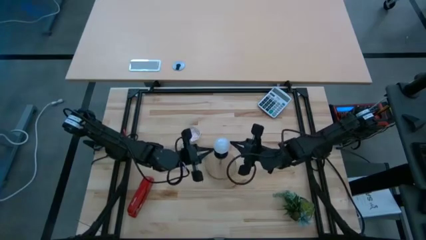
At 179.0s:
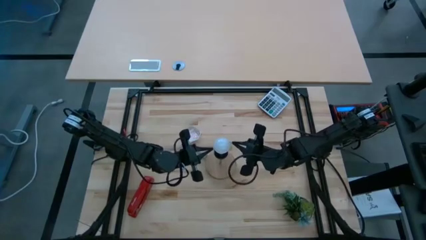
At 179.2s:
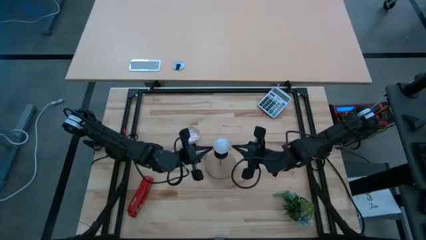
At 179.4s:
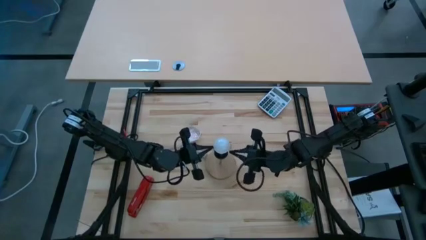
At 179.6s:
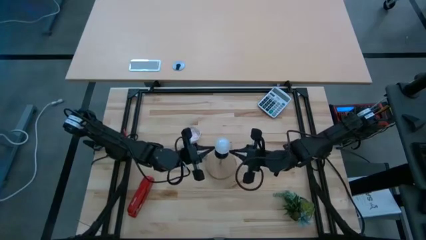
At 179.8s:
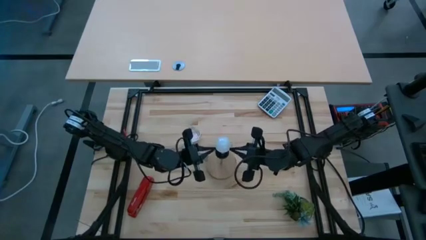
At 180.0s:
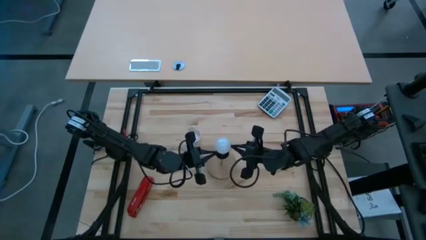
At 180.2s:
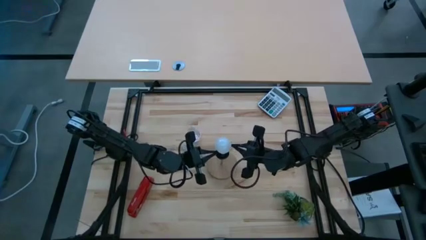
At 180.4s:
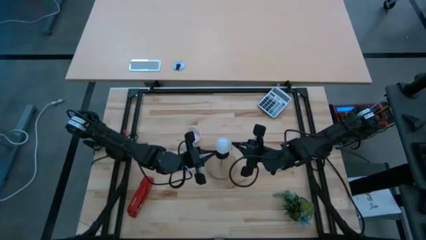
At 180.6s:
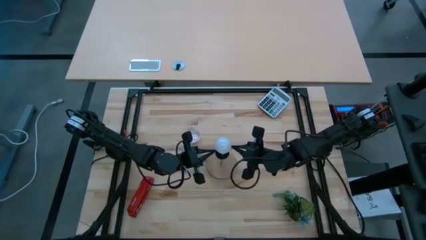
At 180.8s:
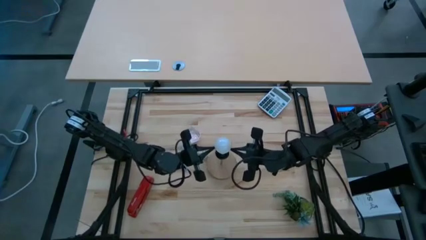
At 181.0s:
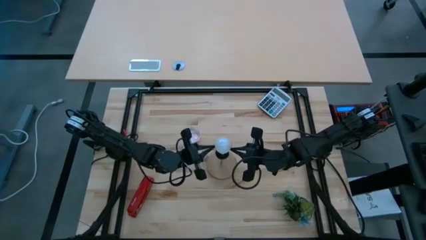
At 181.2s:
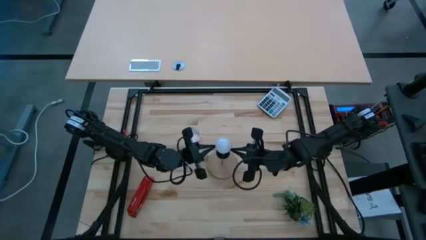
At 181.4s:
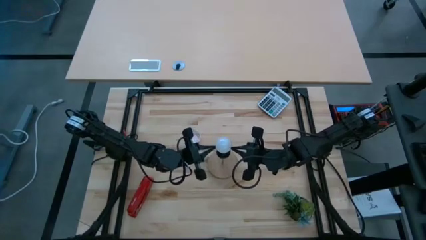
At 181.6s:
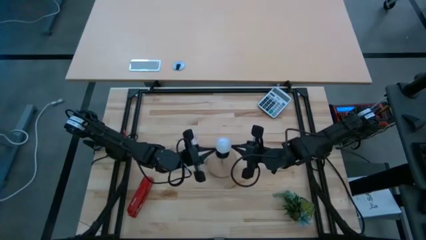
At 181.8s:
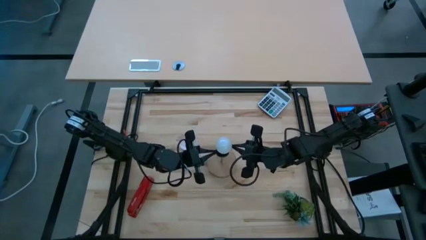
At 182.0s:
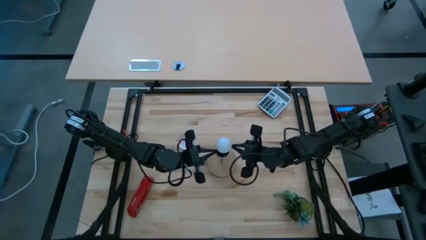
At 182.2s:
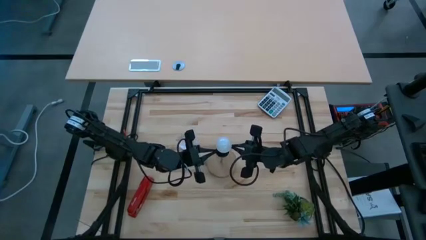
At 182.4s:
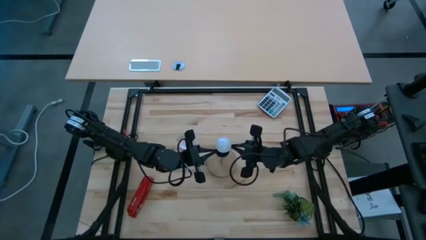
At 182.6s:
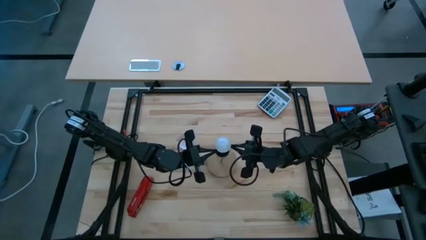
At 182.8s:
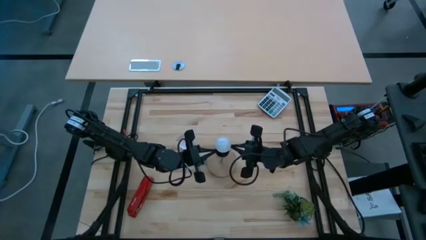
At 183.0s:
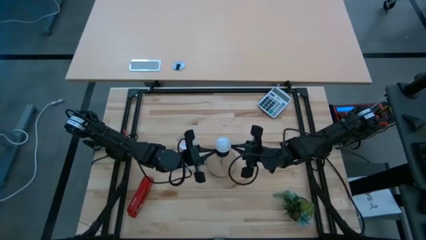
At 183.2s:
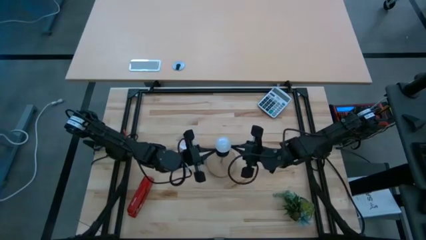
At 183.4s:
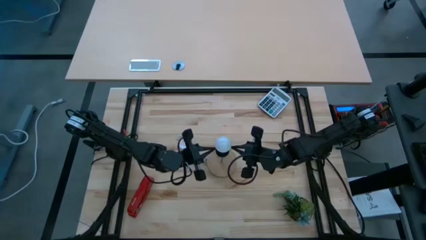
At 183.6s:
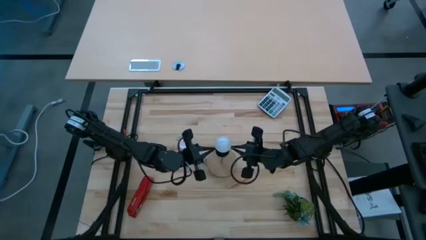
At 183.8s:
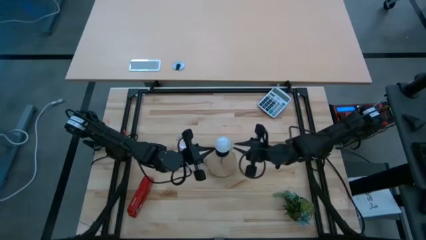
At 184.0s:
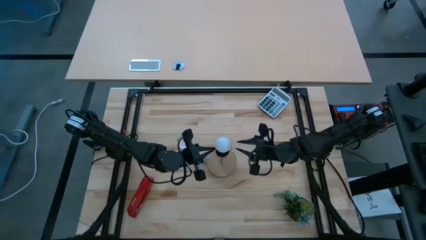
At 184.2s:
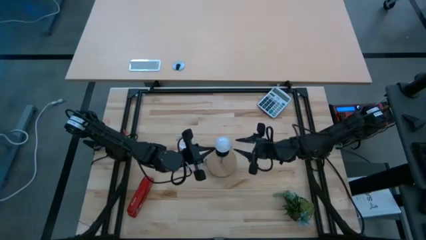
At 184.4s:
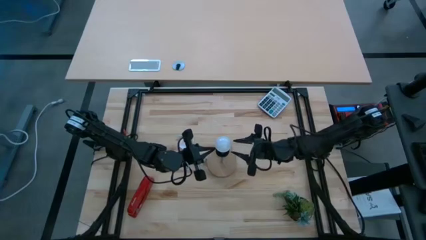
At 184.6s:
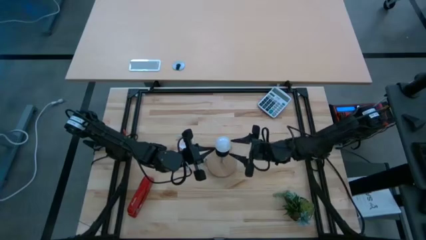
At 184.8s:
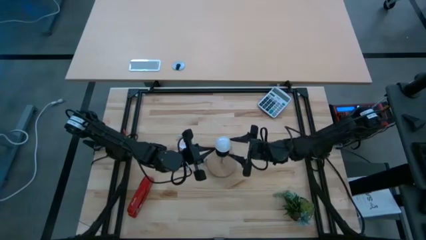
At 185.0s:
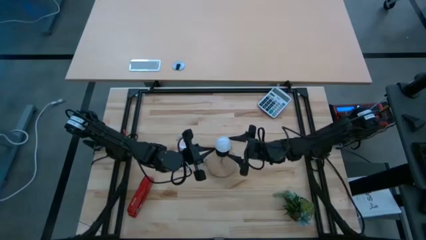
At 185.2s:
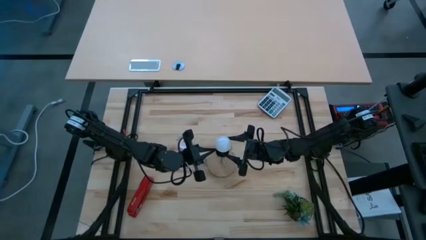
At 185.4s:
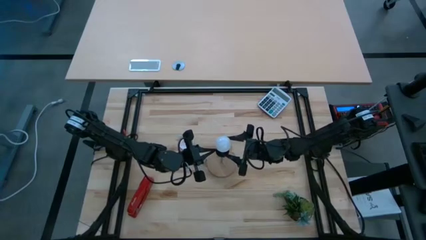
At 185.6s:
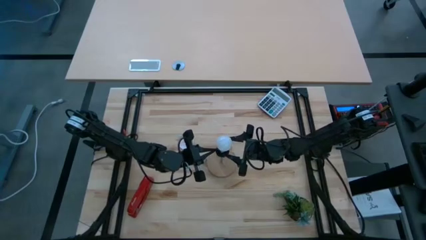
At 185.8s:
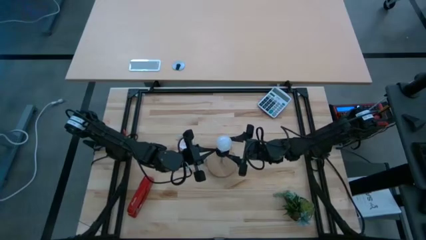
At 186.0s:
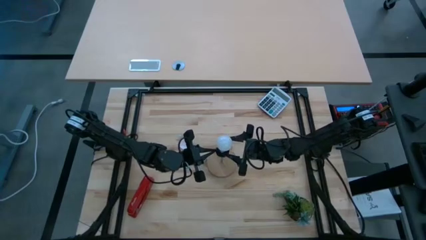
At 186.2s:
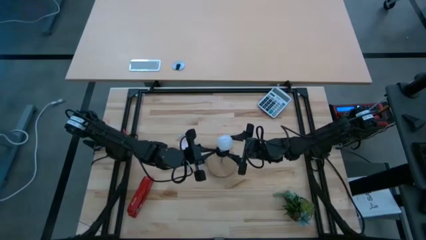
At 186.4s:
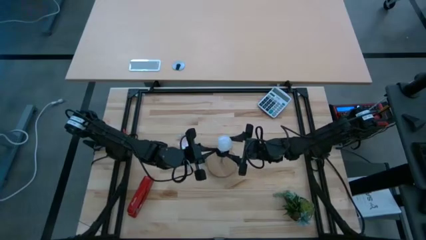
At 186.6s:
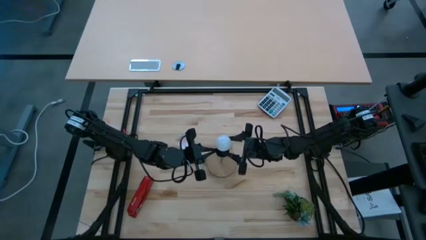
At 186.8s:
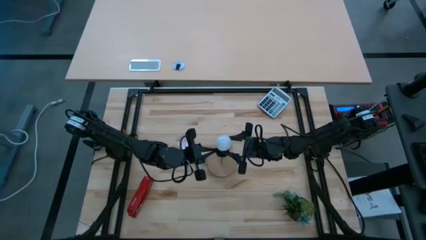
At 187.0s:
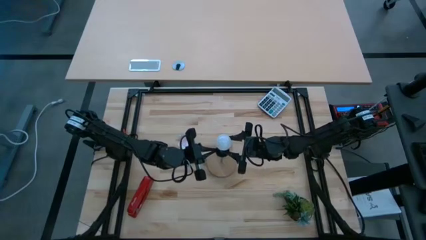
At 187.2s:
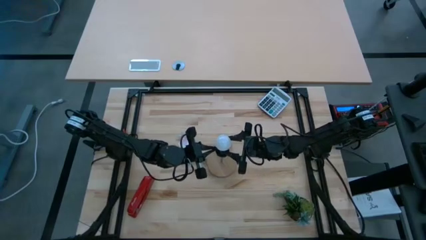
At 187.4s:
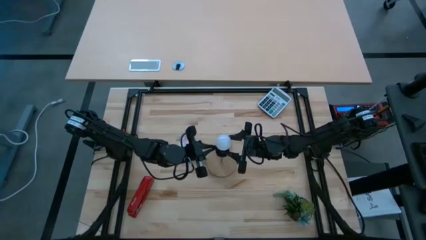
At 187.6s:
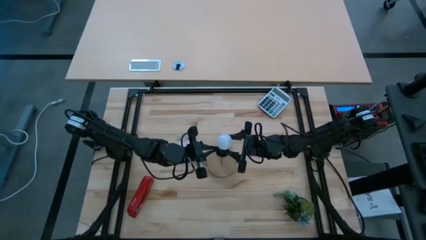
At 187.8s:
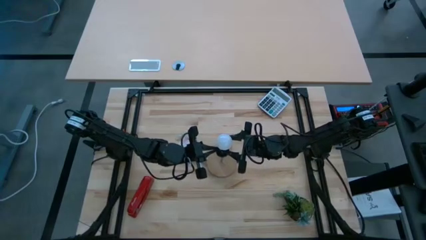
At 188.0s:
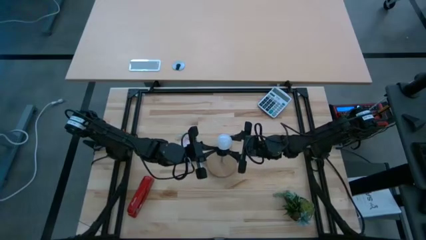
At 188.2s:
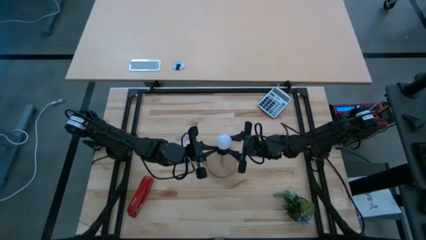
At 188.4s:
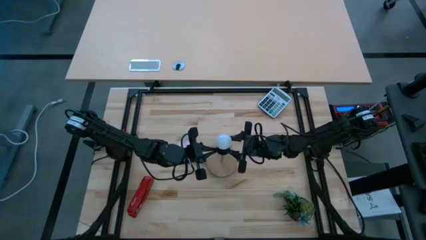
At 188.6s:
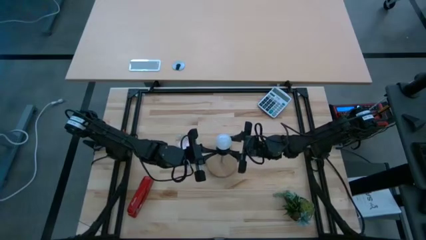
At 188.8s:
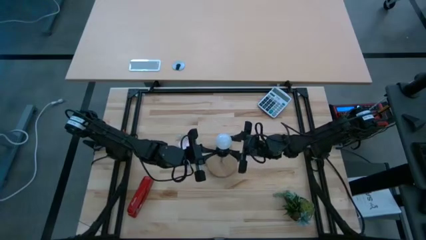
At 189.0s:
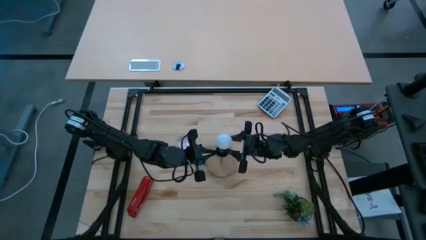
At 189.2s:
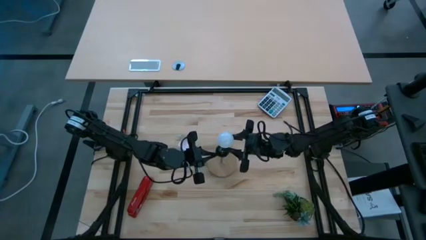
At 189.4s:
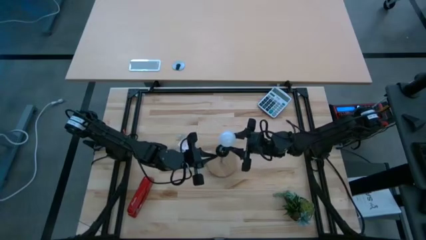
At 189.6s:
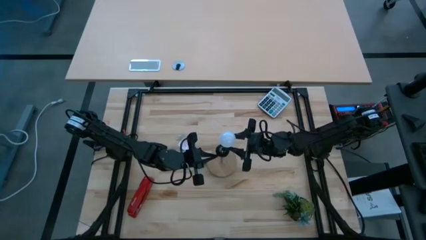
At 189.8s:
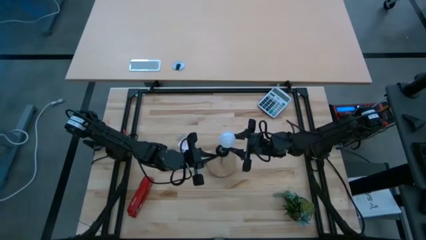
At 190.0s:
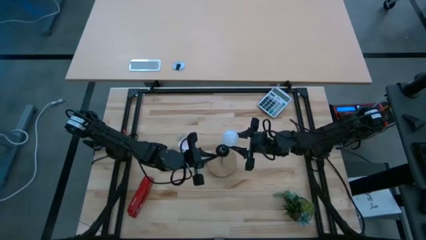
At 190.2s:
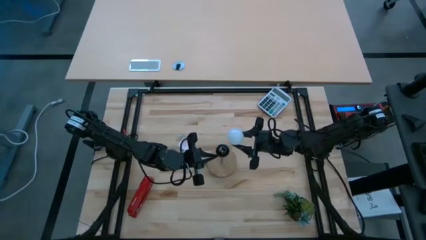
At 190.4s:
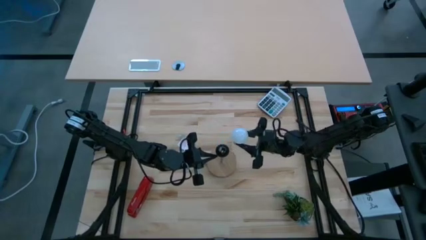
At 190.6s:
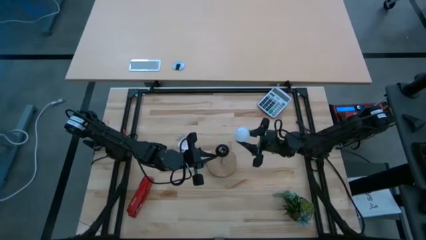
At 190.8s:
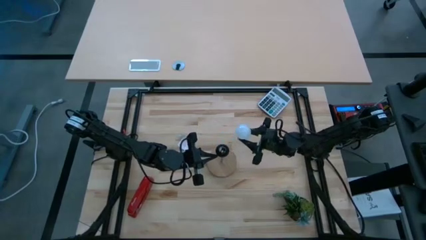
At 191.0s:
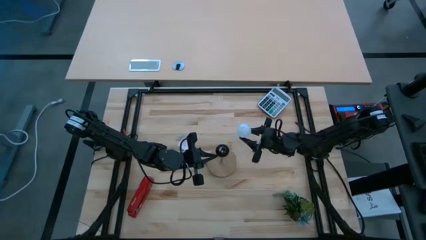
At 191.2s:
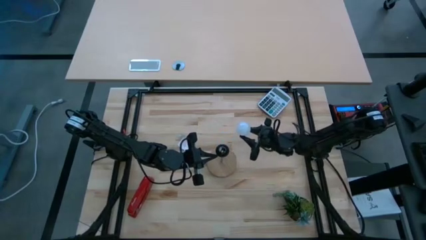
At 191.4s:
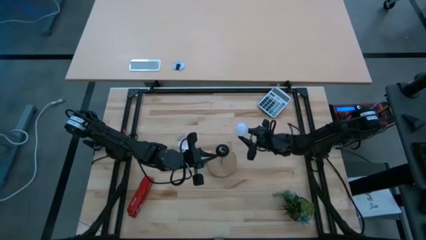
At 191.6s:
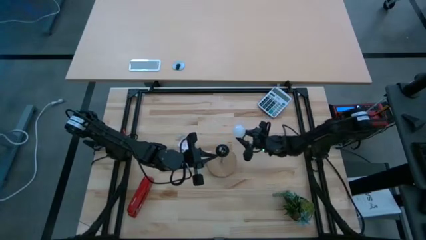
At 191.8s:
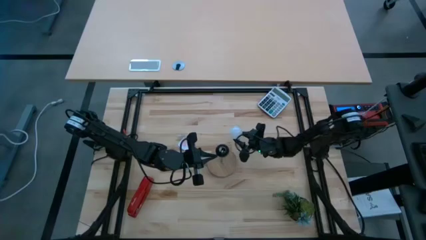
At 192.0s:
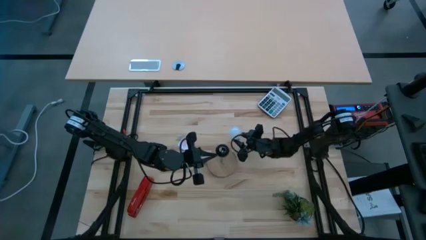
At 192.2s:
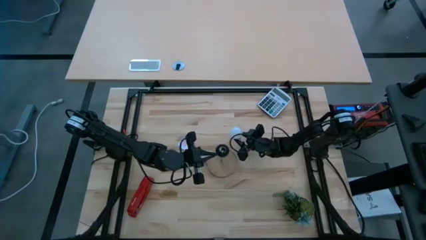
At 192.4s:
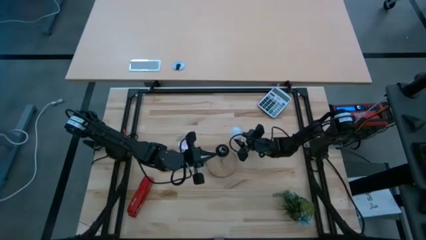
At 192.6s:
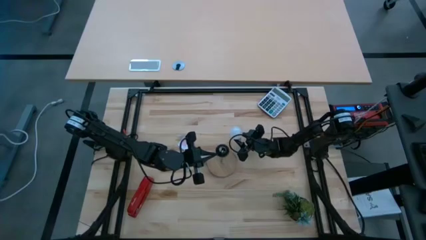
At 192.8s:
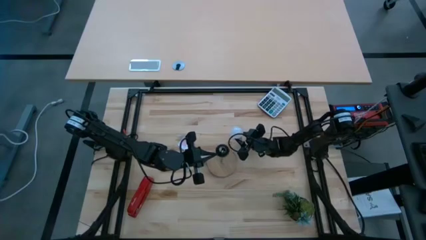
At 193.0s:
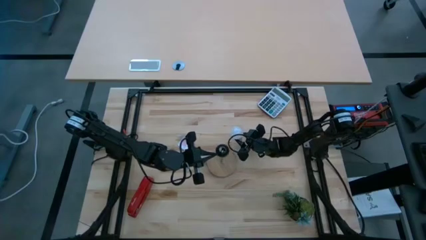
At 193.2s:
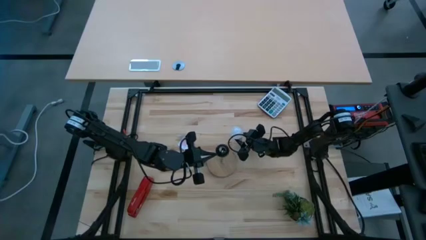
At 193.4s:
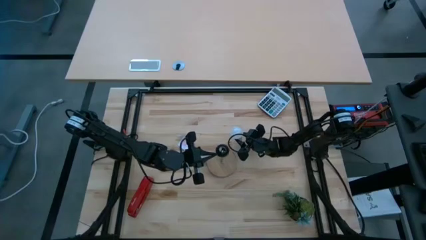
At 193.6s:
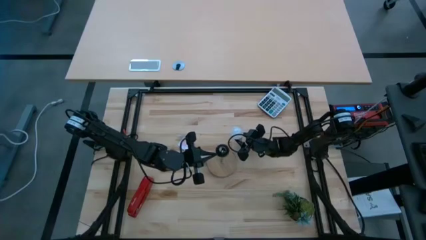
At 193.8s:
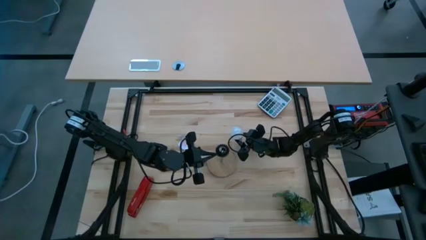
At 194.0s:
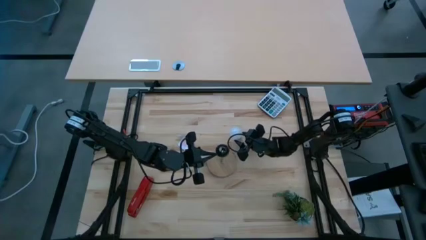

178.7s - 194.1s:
Task: Screw lightbulb
Remove the lightbulb from the brown lamp
